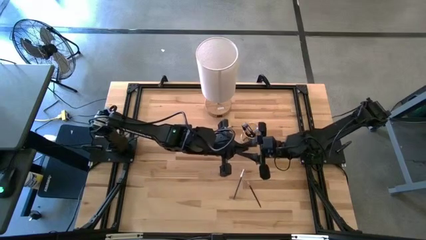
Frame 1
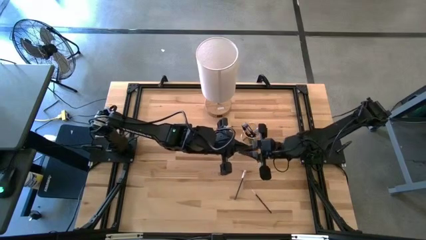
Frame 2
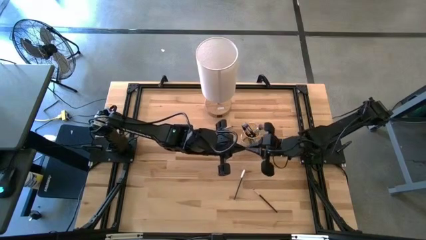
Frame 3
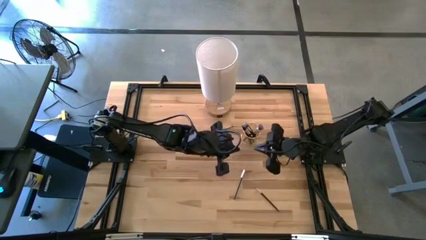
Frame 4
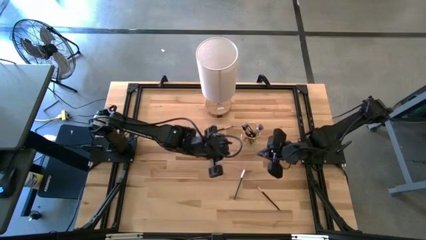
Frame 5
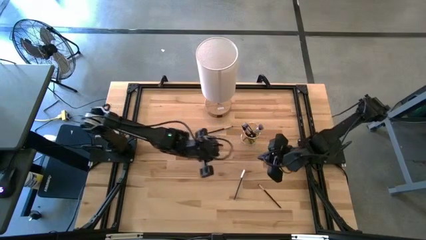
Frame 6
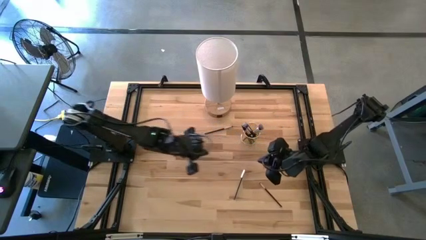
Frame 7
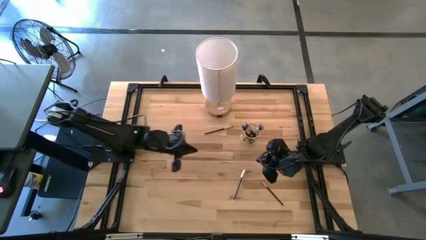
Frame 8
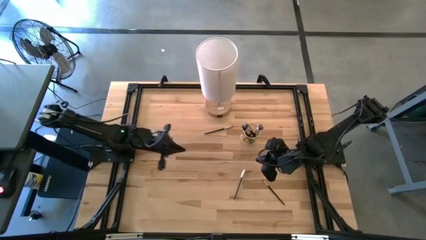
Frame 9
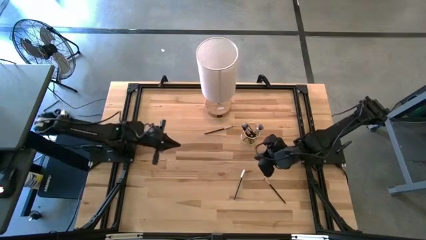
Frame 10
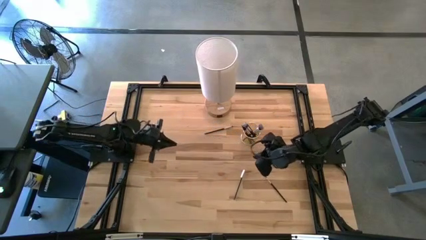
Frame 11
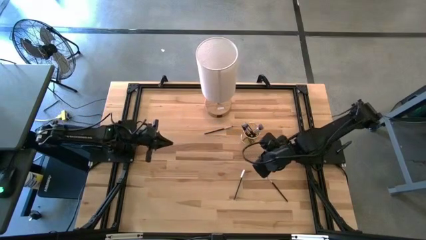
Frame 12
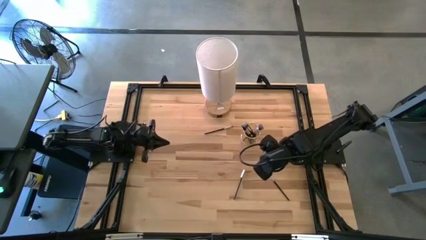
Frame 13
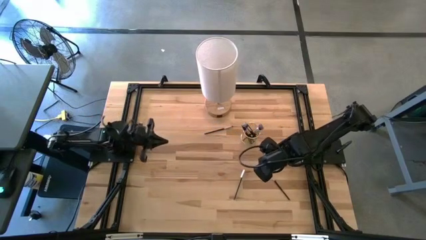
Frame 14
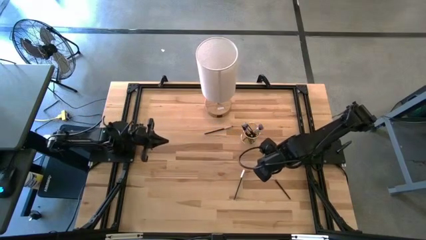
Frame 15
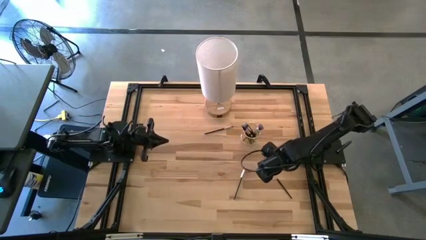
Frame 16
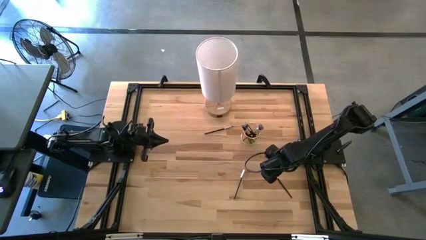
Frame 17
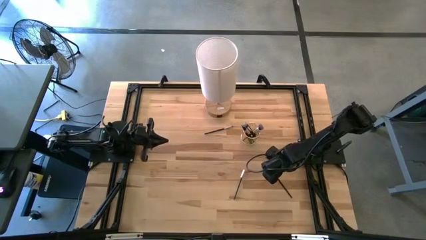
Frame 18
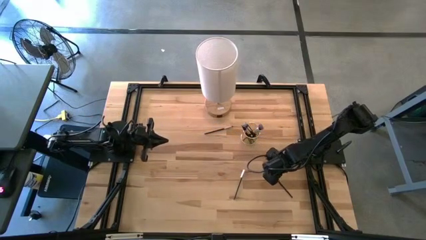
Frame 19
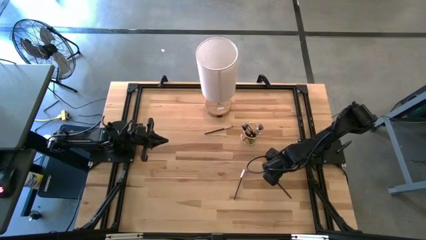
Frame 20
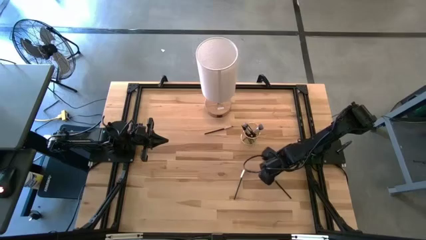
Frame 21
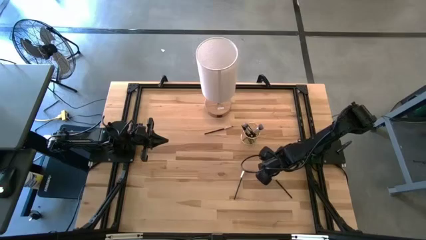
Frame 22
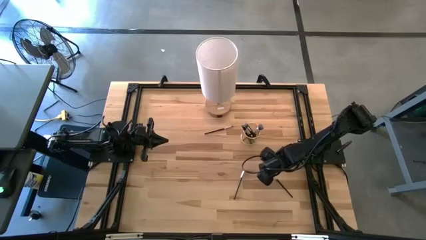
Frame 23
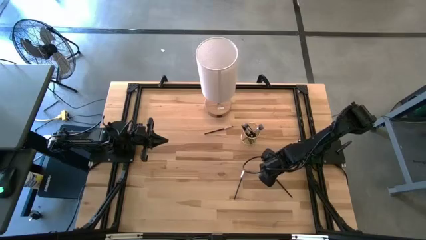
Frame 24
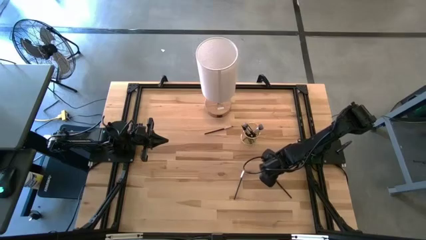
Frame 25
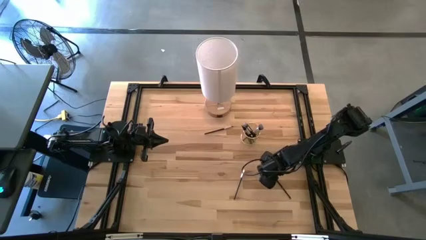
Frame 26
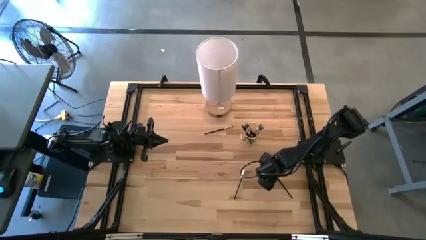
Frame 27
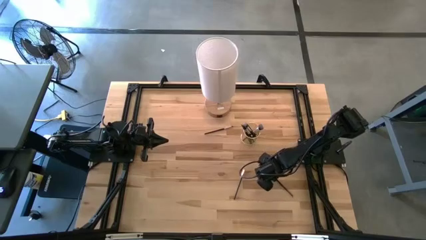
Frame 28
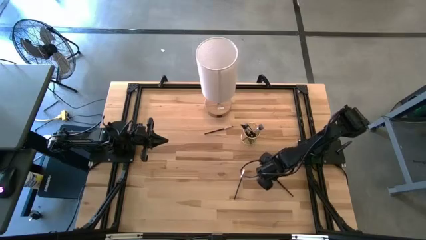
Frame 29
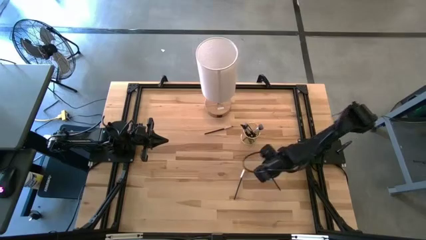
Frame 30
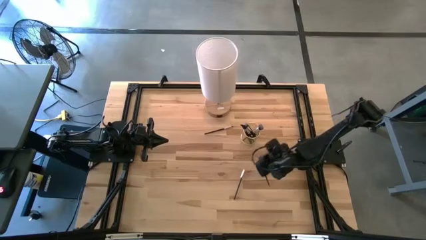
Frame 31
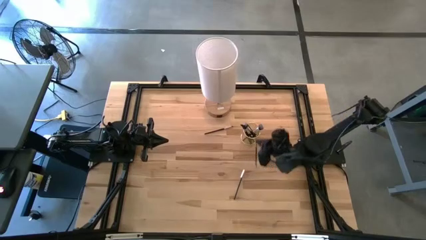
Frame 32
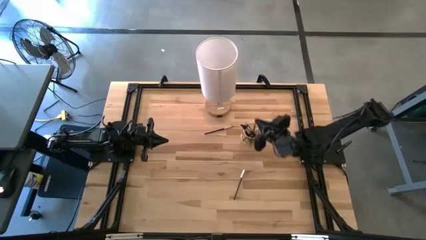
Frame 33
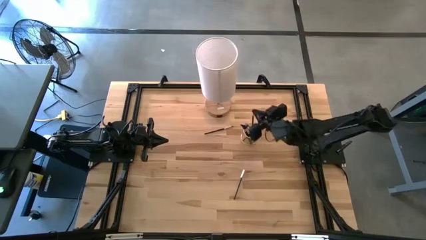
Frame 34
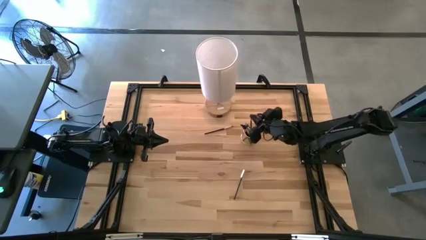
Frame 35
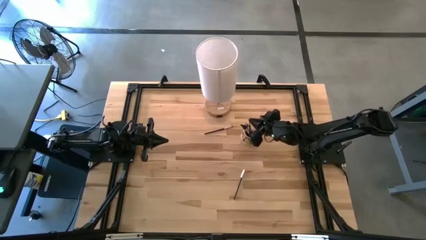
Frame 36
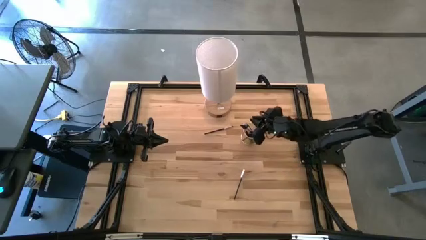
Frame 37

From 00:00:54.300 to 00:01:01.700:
Task: Pick & Place Makeup Brushes
Put the black eyeshadow brush into the makeup brush holder

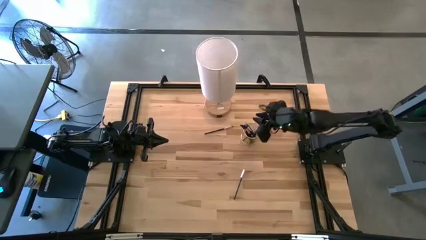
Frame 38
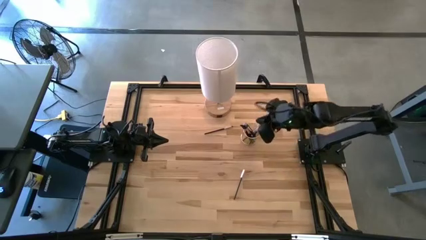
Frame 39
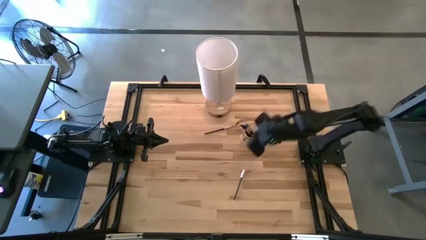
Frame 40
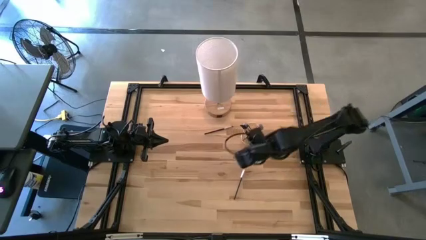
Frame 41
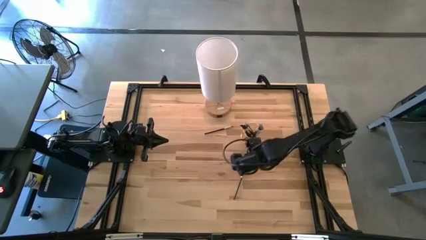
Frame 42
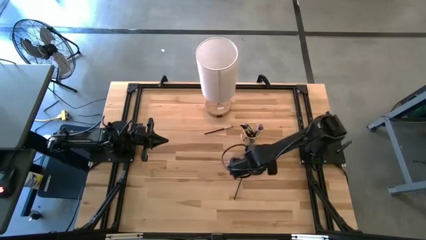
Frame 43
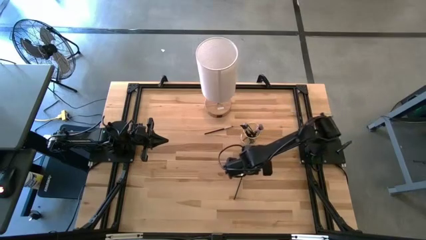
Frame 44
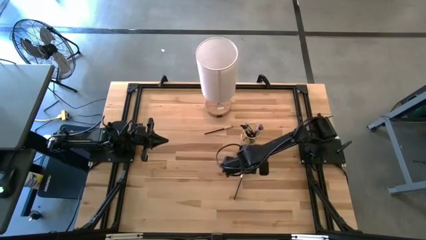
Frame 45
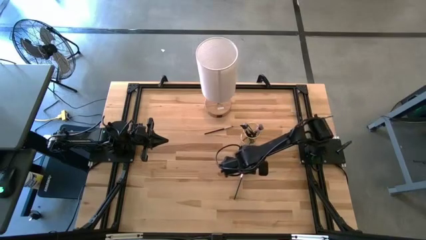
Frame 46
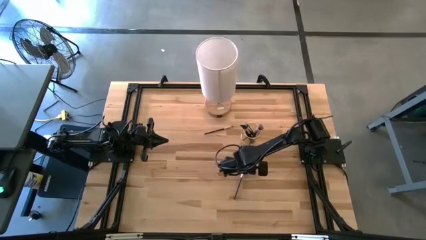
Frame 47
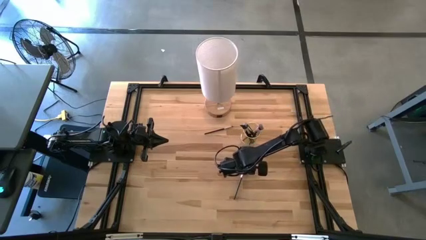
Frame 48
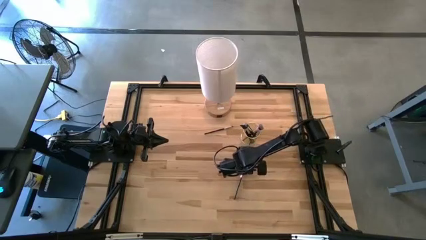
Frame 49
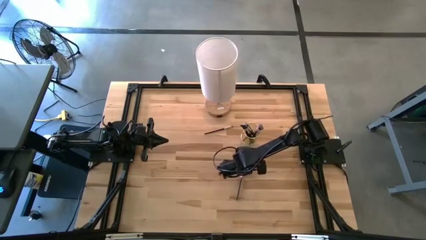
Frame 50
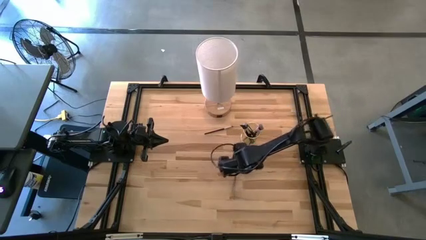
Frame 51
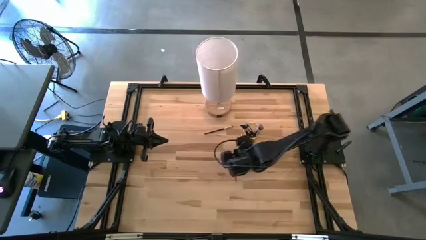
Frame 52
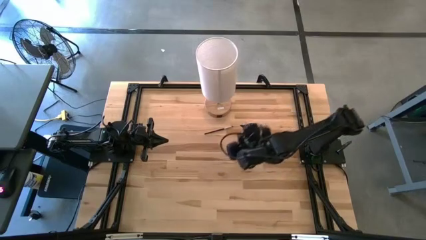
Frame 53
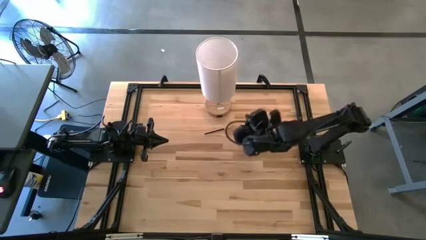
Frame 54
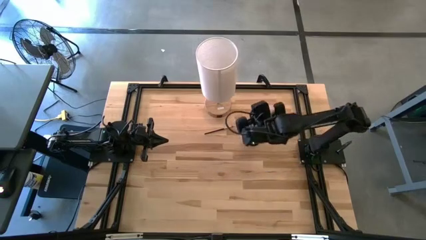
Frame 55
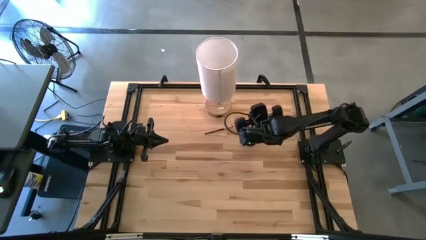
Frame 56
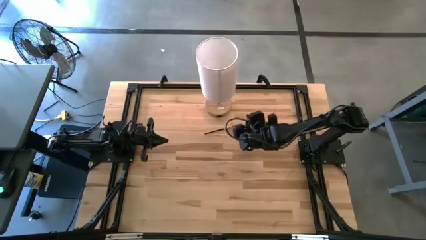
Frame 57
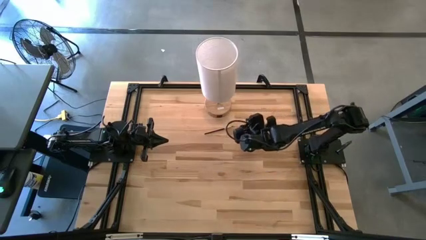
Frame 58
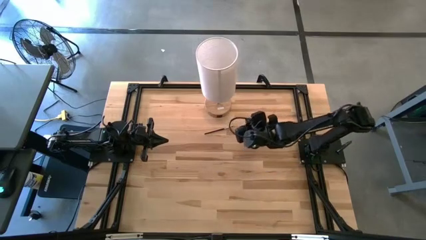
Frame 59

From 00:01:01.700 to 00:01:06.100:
Put the black eyeshadow brush into the makeup brush holder

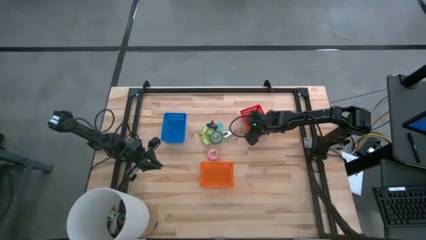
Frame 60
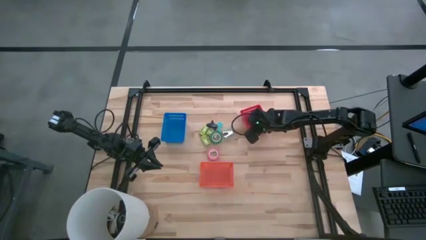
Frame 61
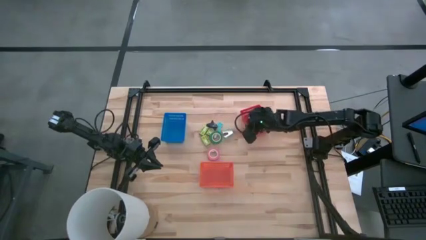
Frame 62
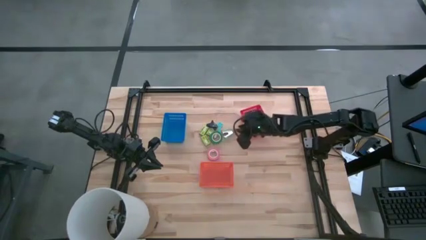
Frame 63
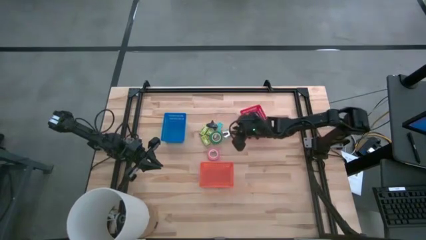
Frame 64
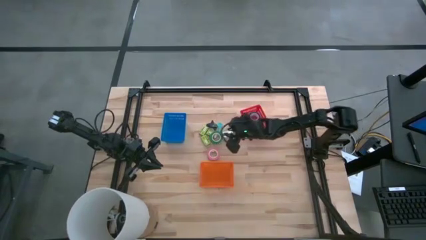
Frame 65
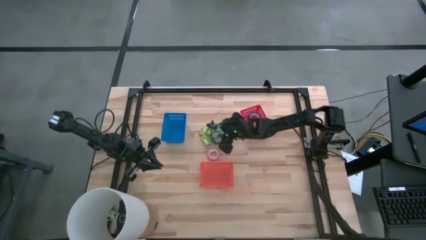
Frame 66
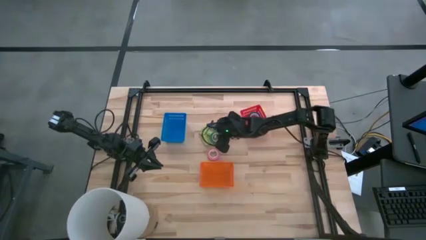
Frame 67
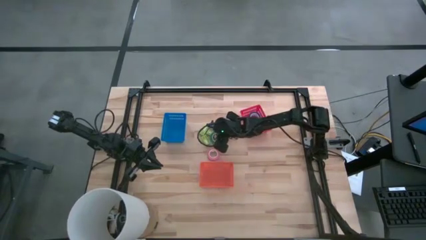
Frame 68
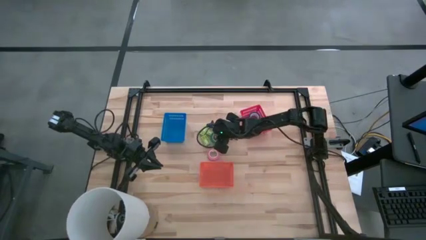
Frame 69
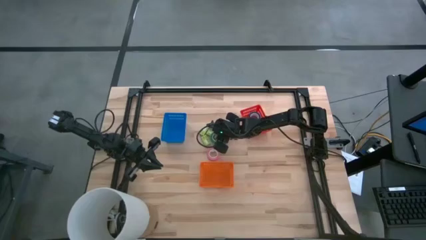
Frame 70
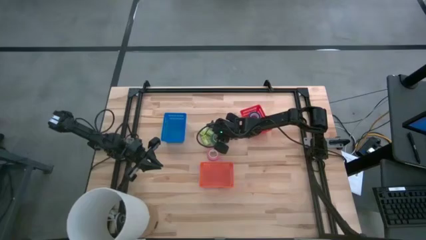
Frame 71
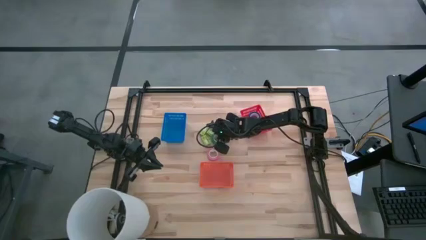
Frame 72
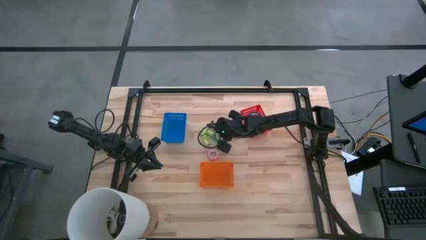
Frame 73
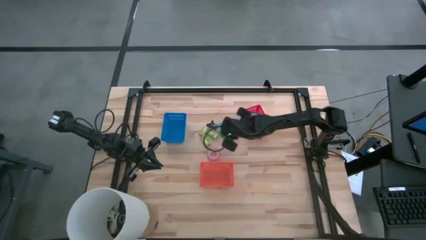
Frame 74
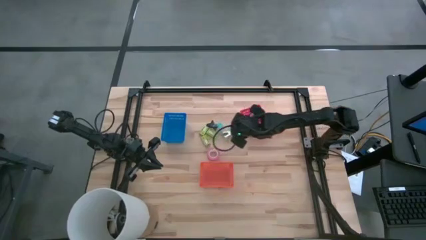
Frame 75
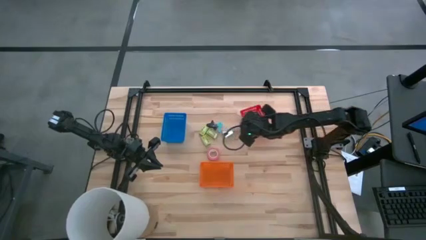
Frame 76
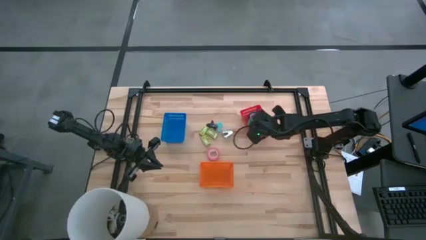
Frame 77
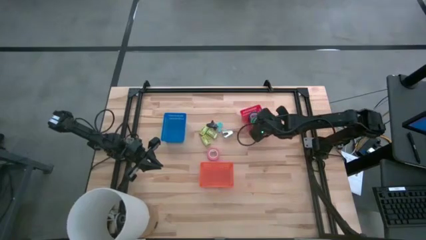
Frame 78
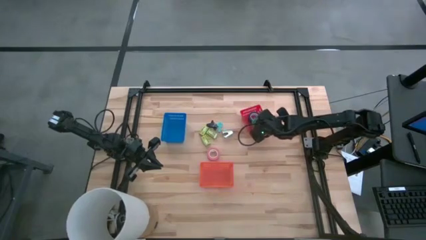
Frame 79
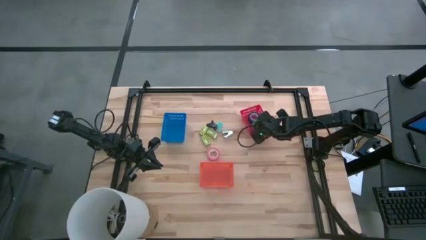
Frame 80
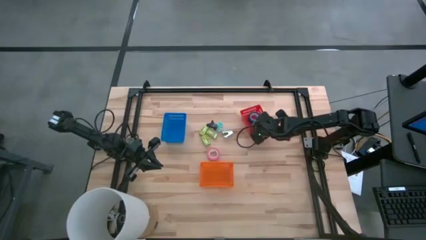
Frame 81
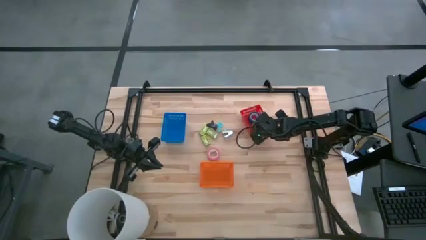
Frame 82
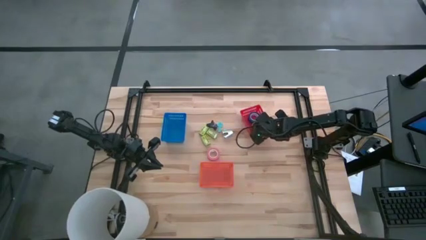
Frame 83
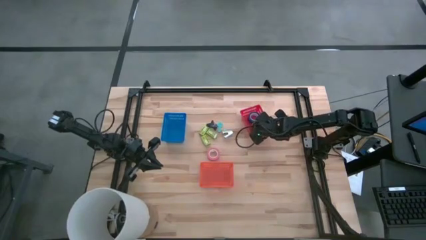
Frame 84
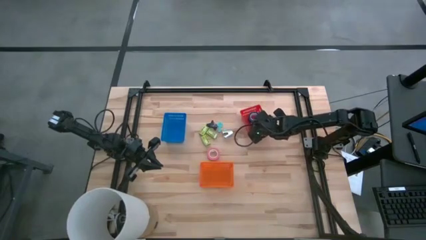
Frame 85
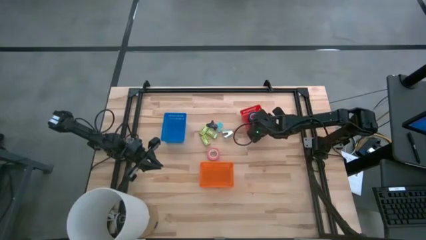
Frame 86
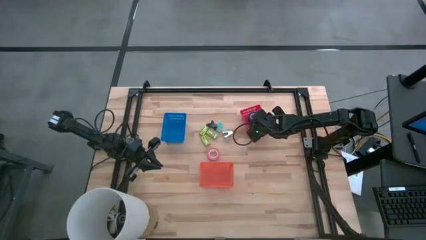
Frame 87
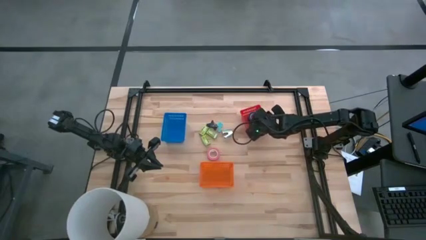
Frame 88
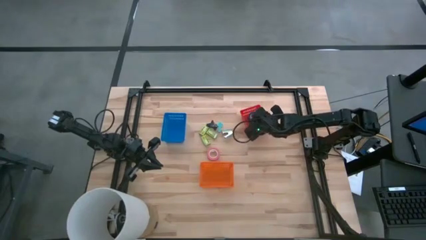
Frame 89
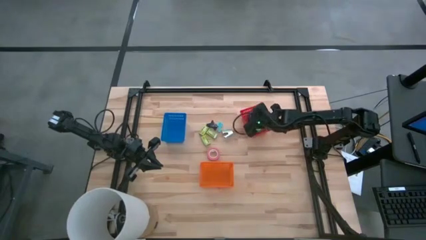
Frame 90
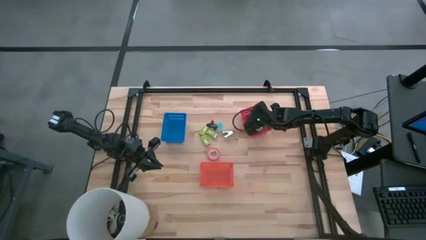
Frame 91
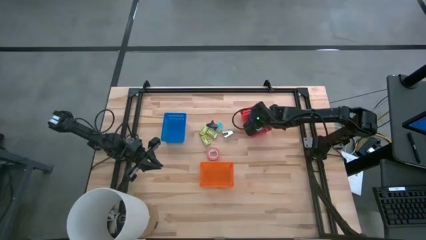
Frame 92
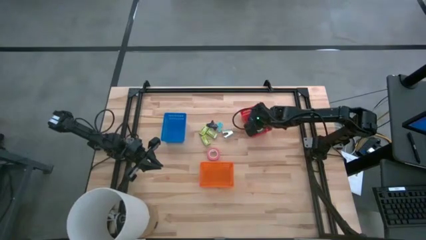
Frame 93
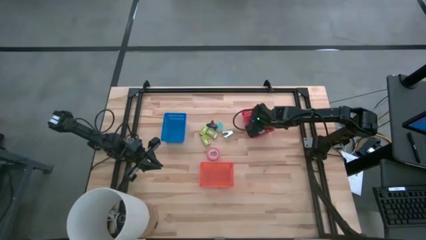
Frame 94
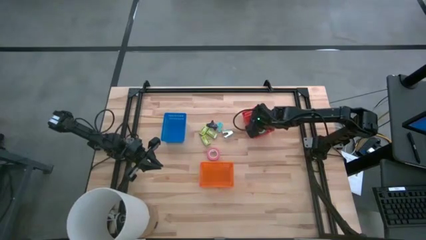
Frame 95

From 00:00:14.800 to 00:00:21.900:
Task: Pick and place Stapler, Stapler remover, tape
Put the green tape into the red basket
